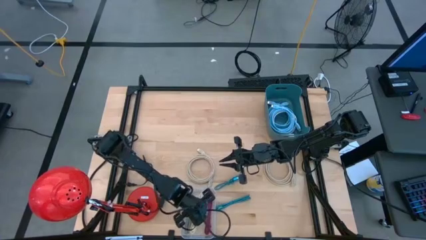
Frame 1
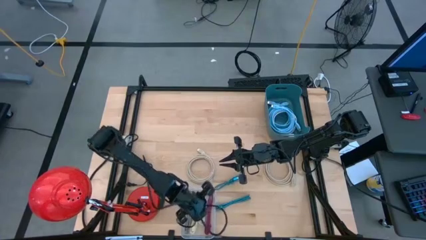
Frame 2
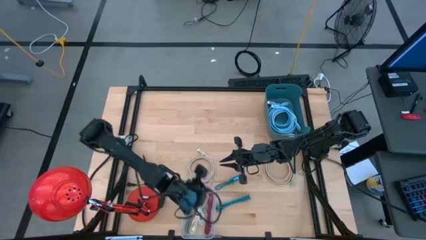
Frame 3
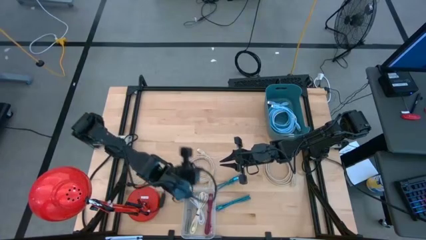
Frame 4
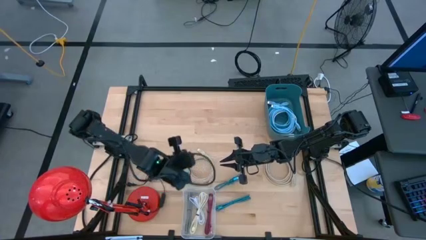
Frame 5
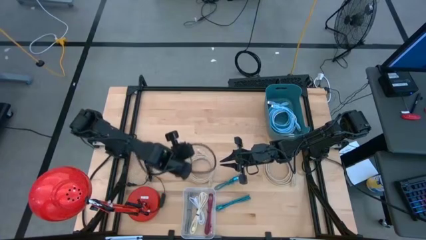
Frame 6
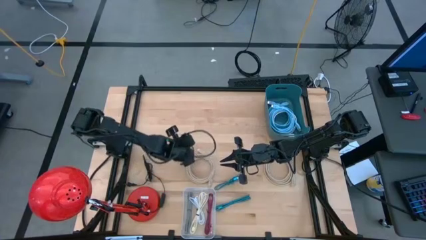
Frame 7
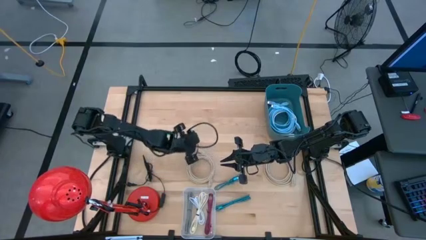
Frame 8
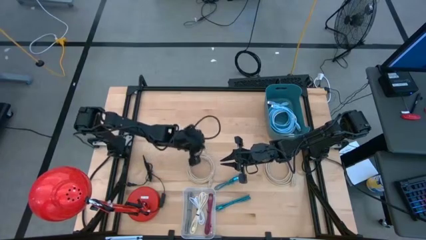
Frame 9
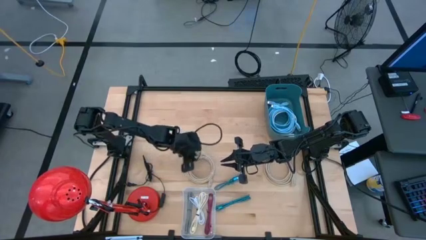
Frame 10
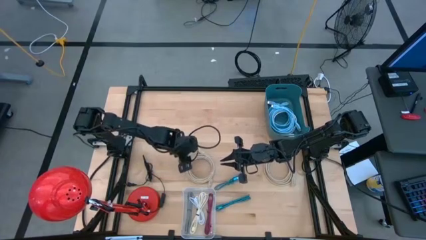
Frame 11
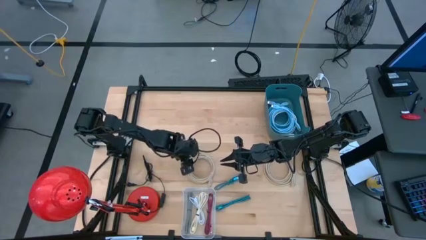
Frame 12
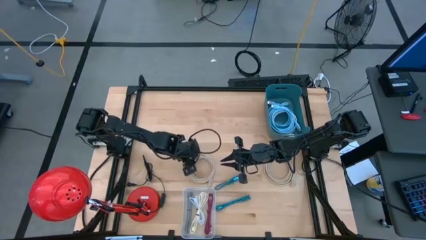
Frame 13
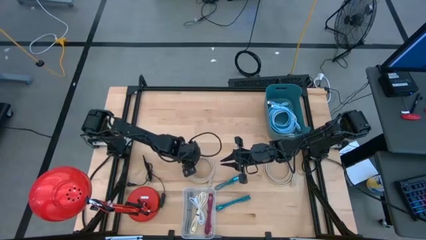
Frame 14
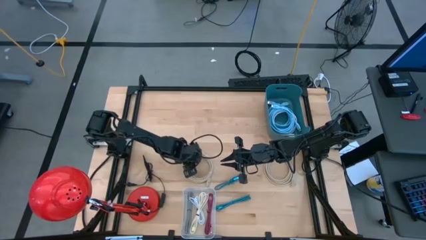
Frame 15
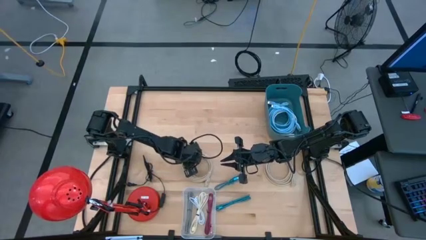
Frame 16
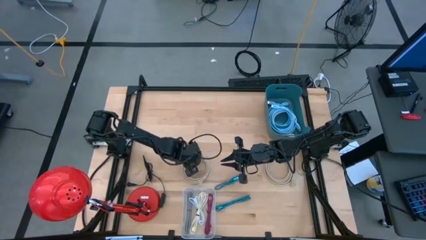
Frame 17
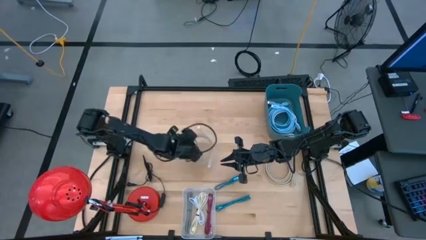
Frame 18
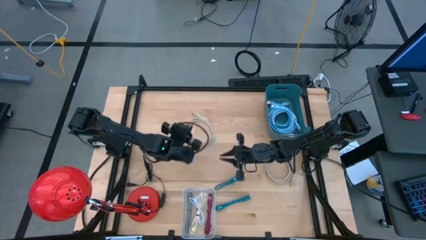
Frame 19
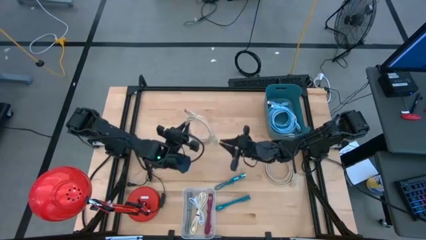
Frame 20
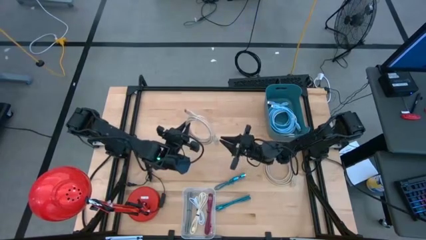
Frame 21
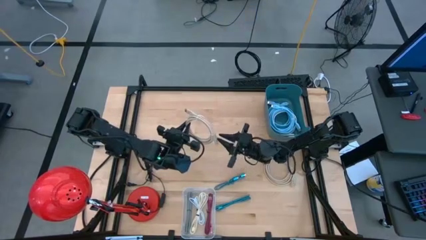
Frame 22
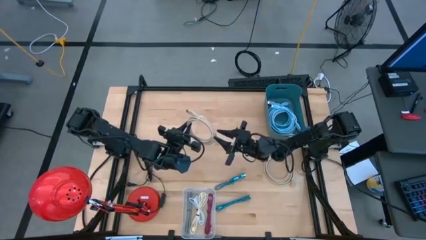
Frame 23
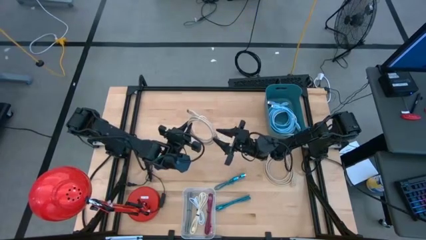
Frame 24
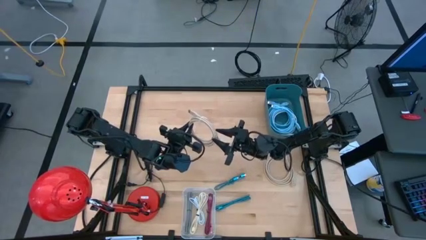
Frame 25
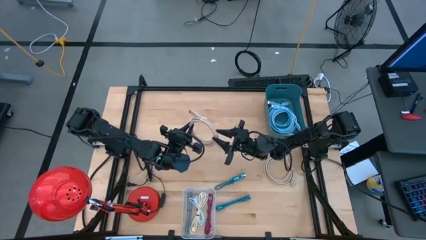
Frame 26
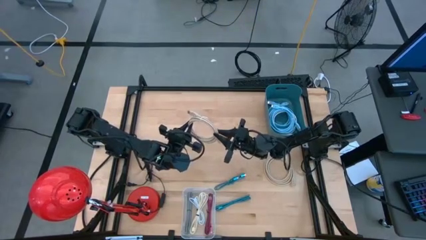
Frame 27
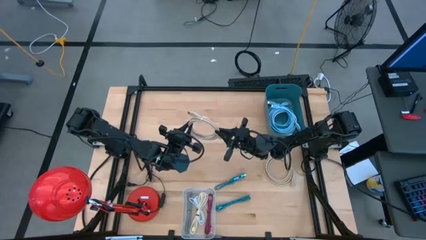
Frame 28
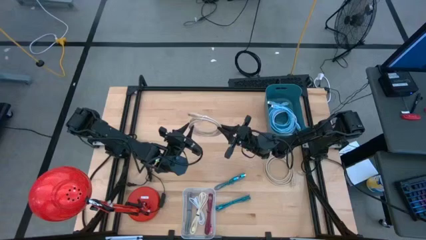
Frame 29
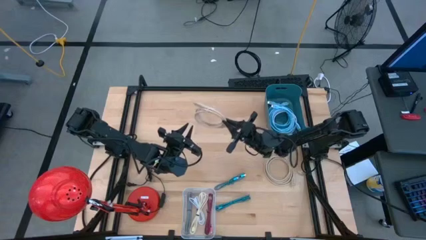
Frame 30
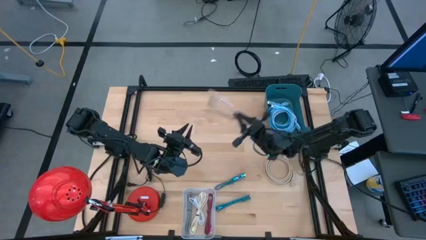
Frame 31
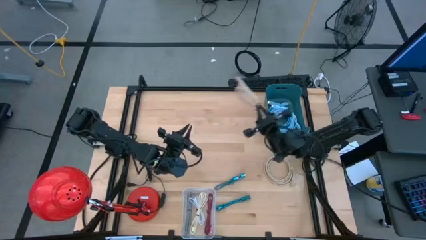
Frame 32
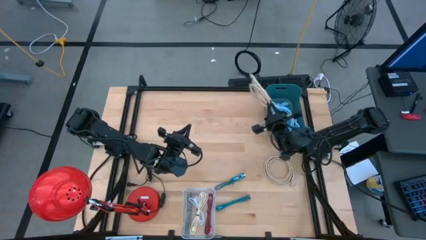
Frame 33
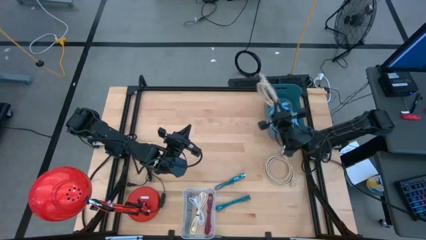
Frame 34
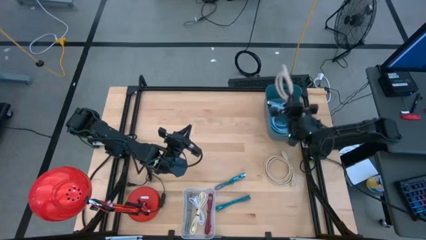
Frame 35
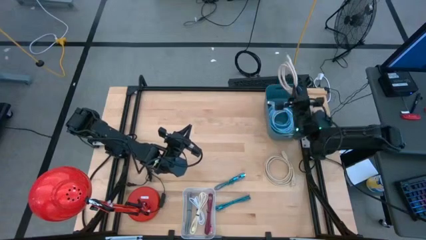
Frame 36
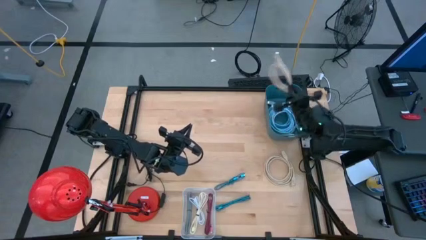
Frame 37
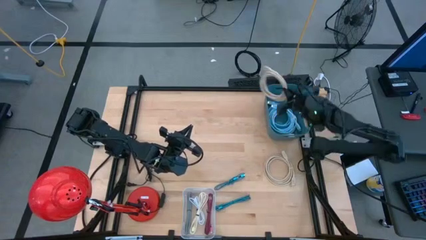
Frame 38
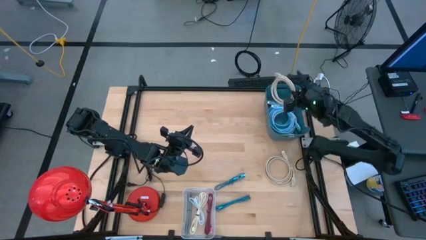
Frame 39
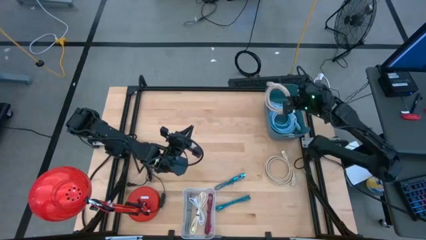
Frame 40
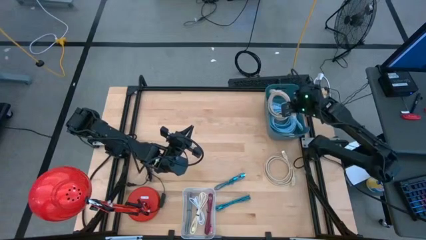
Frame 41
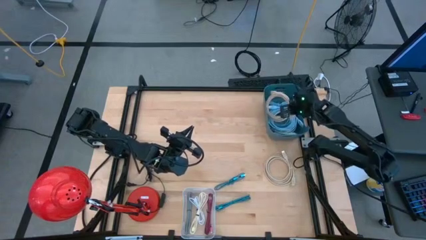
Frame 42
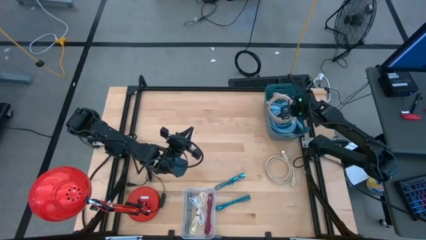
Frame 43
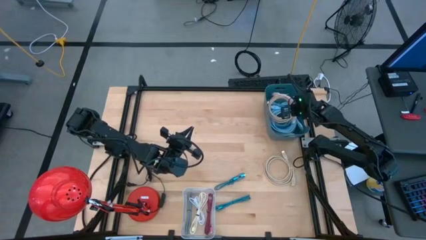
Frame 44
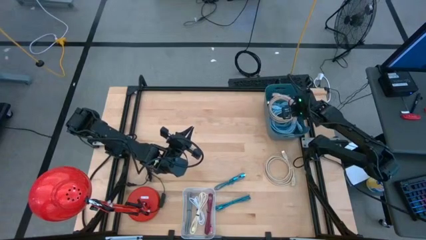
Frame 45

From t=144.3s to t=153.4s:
Task: Pick & Place USB Port
Put the left light brown usb cable into the blue bin

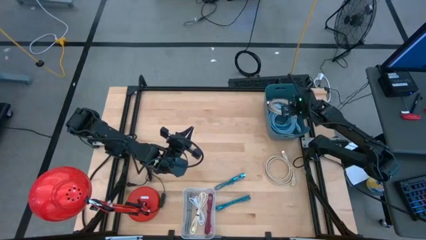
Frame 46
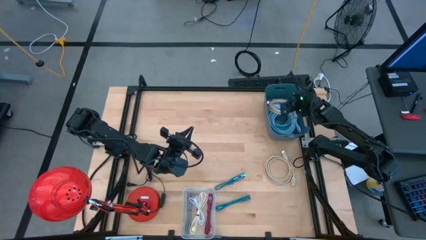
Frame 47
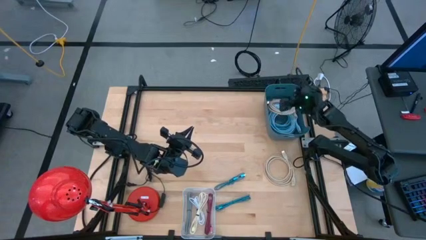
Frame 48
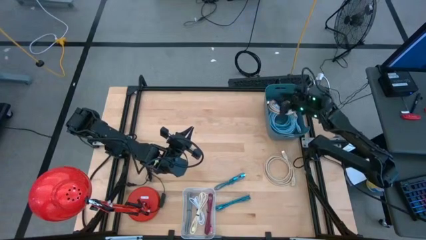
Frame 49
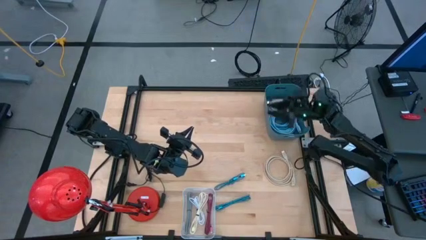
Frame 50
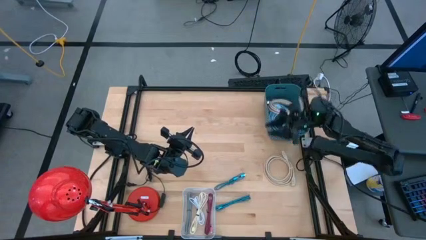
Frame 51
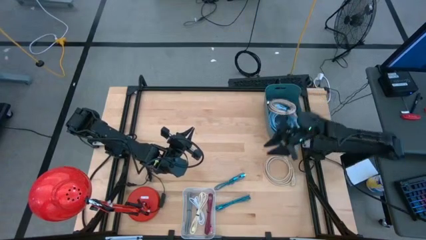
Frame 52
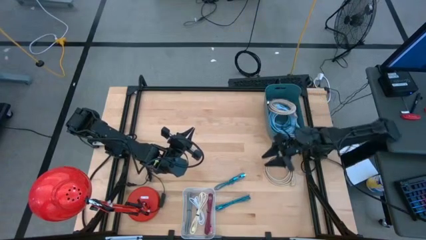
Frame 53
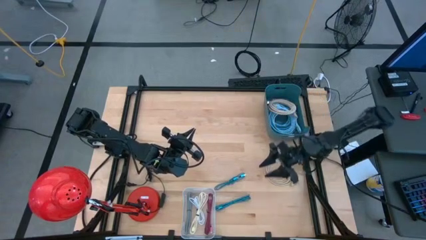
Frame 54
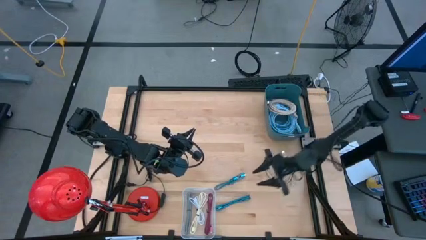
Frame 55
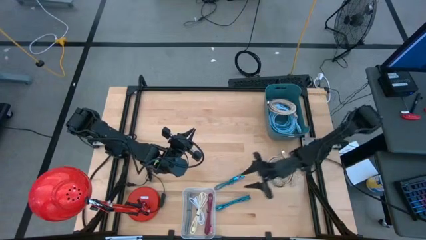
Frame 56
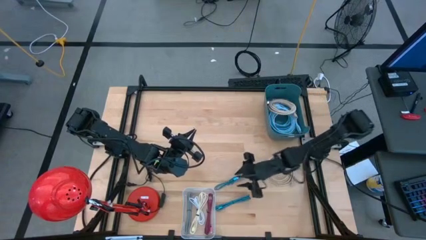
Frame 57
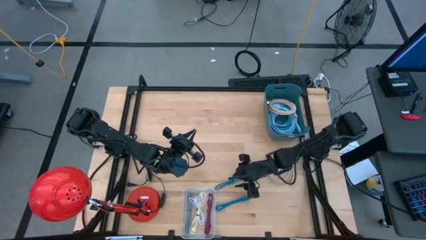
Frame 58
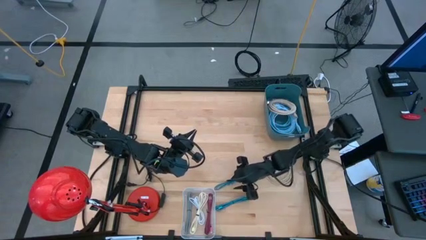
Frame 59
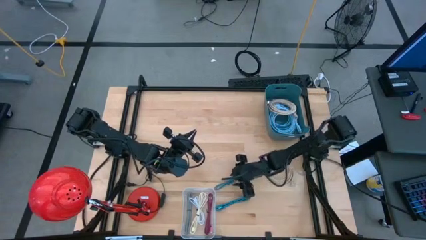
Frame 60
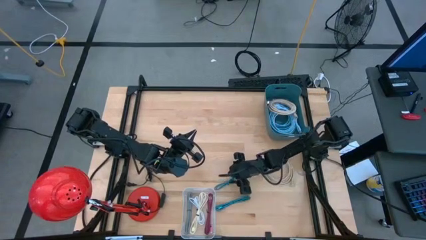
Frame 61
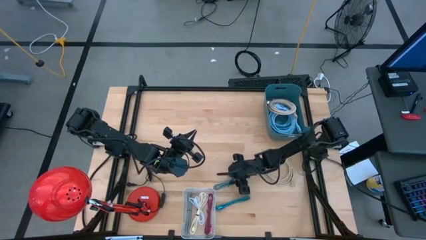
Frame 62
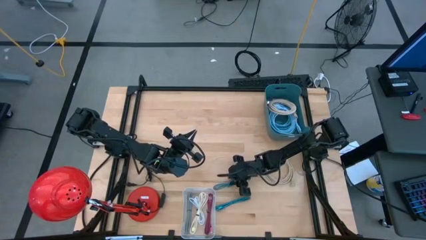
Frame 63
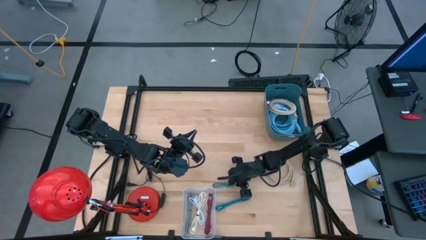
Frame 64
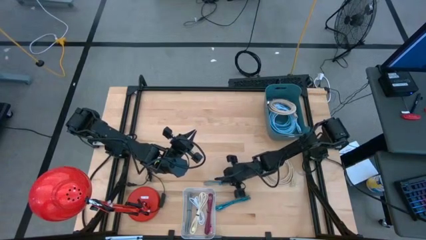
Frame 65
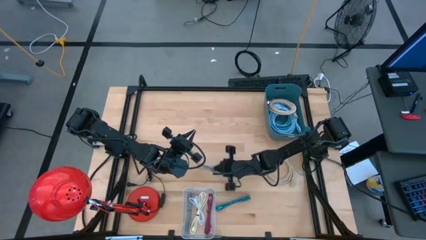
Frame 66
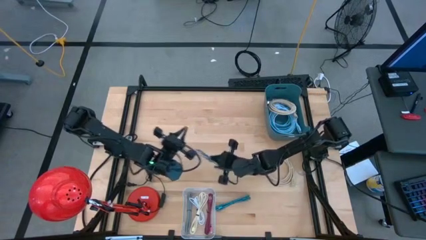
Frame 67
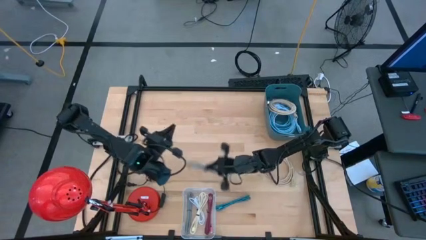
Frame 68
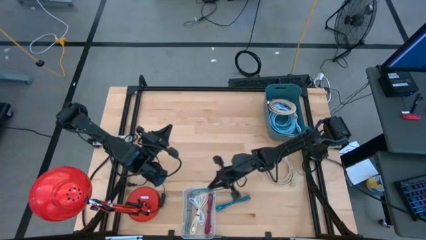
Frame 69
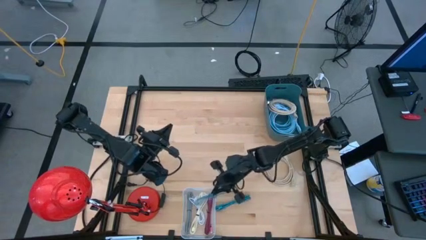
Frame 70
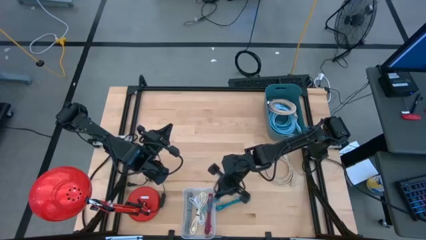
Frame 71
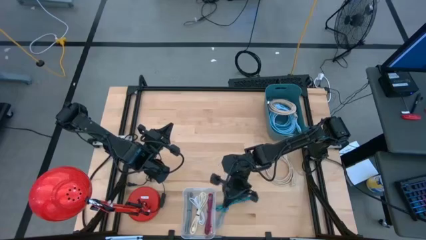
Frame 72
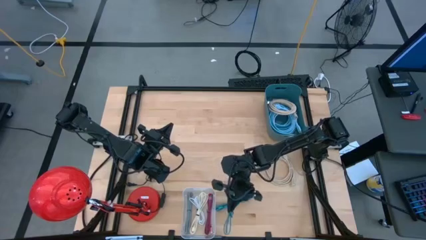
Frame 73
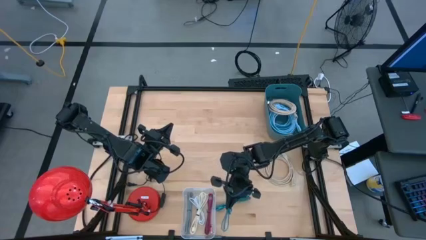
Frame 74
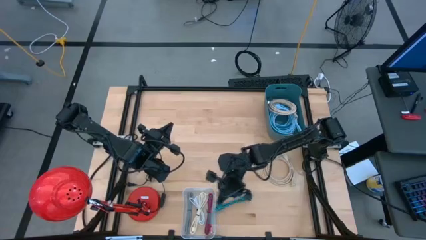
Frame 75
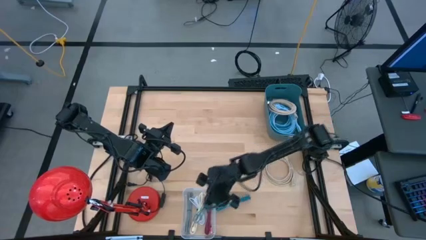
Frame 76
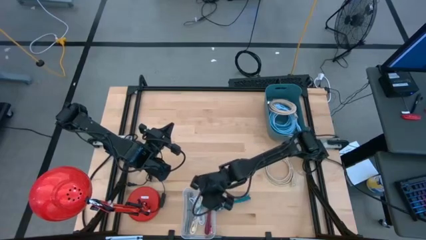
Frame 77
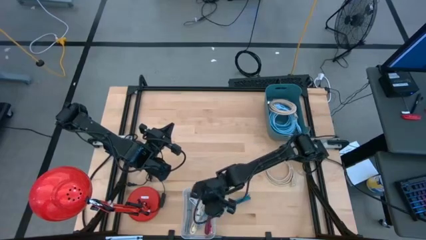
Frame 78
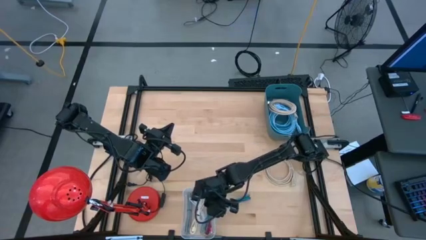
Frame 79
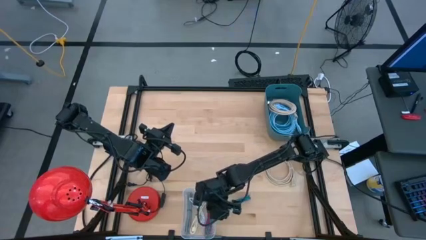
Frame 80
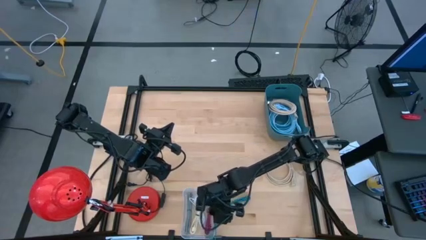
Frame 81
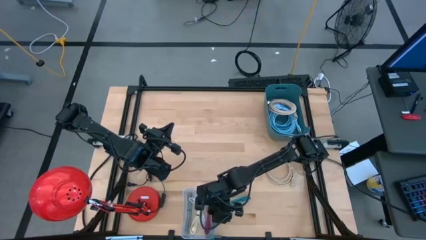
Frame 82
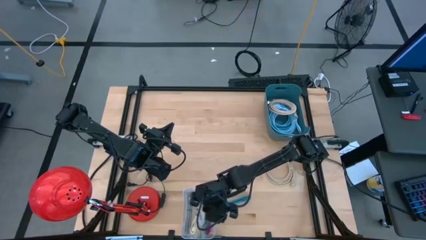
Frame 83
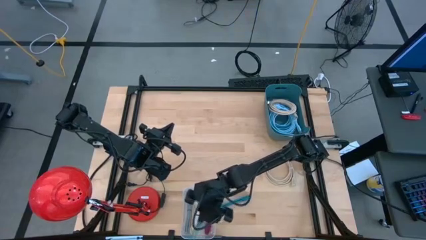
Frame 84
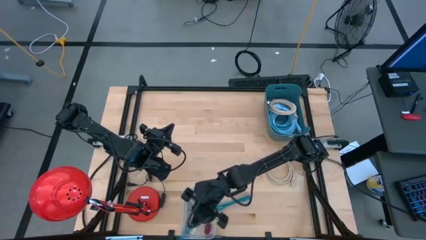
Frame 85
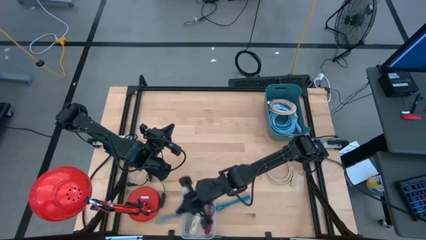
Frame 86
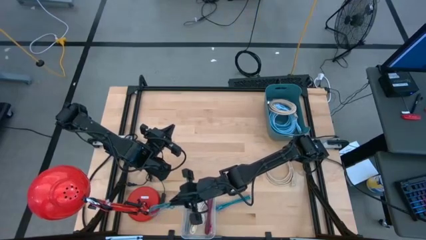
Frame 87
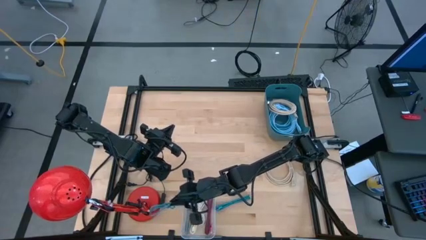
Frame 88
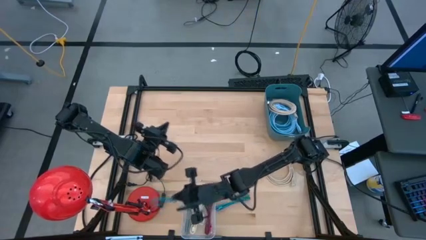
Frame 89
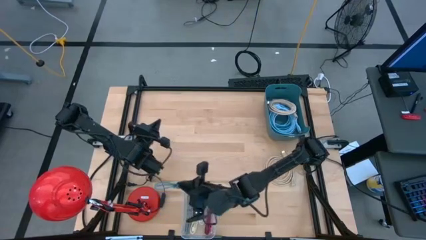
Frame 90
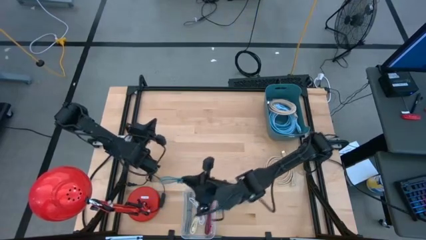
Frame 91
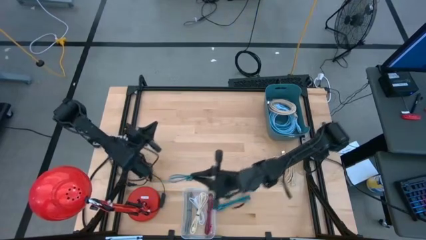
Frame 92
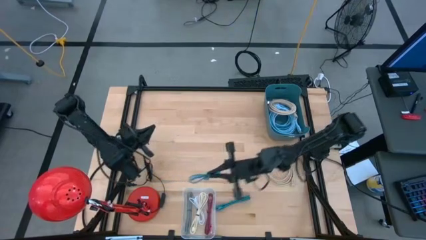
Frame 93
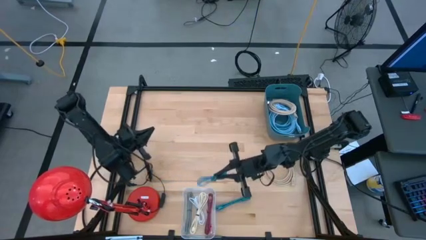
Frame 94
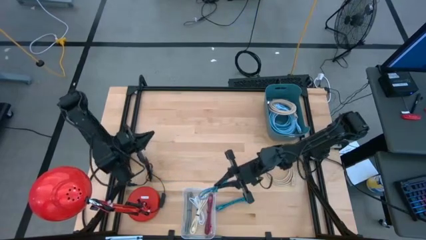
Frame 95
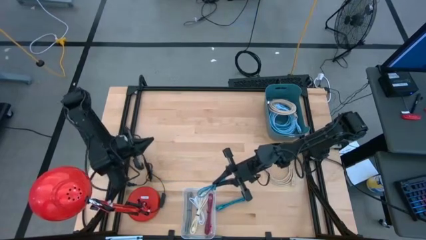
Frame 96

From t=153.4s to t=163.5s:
Put the top blue charger cable into the transparent bin
